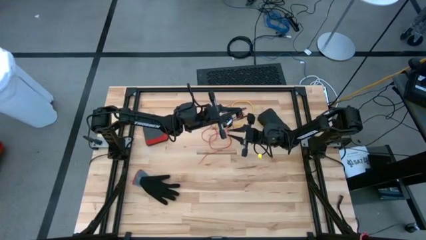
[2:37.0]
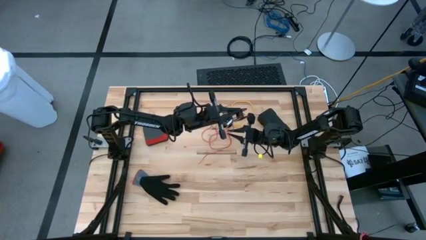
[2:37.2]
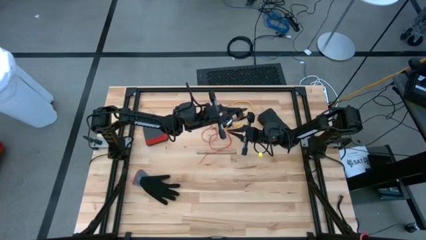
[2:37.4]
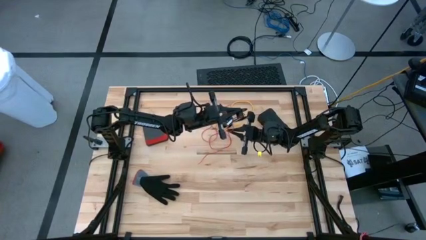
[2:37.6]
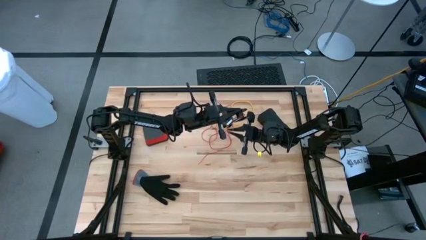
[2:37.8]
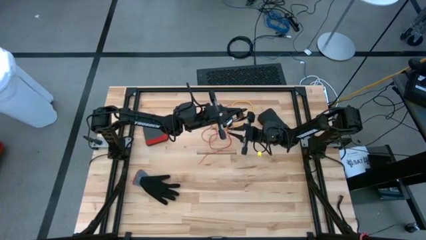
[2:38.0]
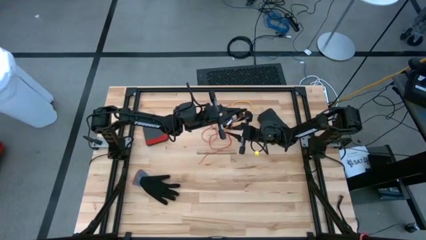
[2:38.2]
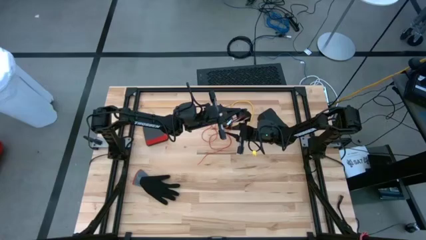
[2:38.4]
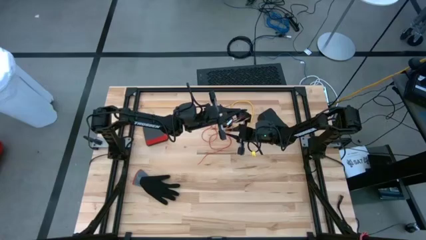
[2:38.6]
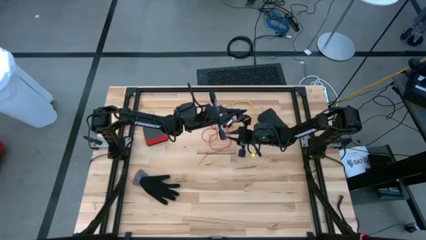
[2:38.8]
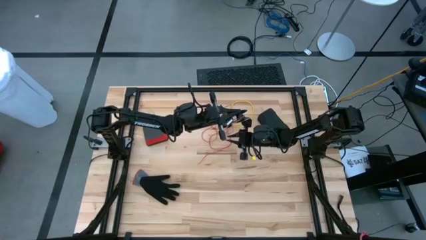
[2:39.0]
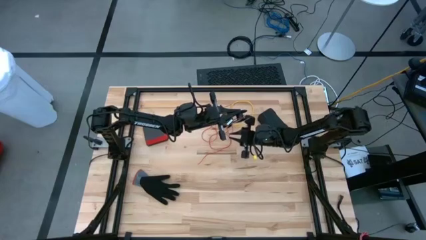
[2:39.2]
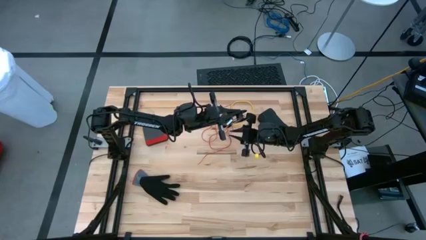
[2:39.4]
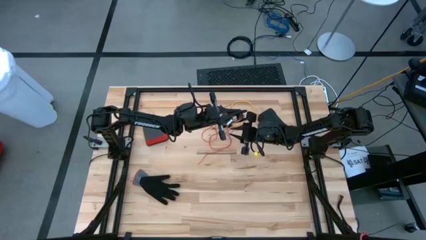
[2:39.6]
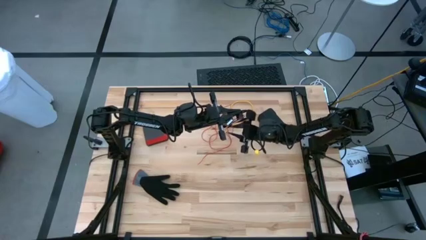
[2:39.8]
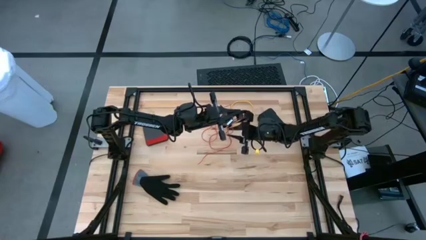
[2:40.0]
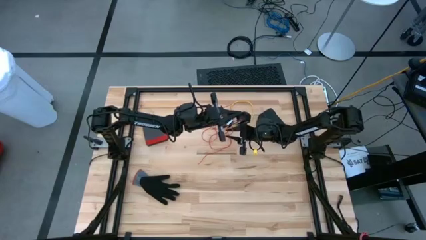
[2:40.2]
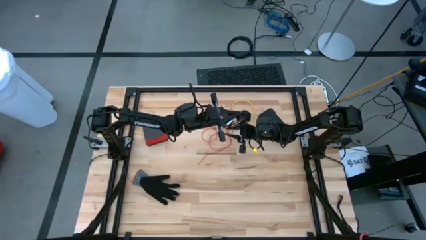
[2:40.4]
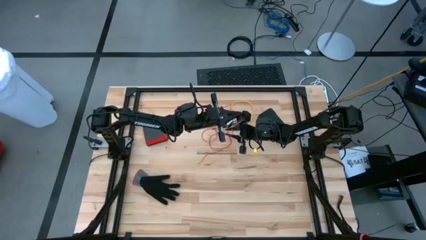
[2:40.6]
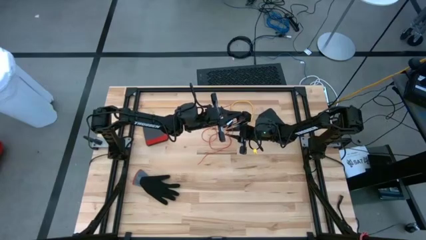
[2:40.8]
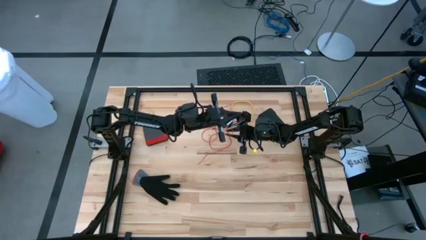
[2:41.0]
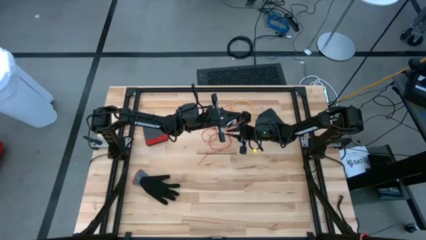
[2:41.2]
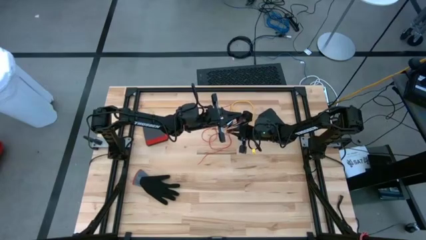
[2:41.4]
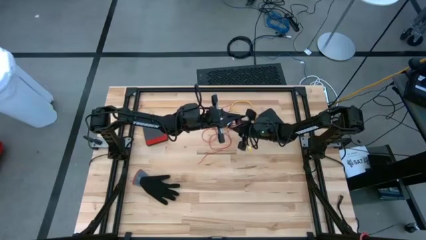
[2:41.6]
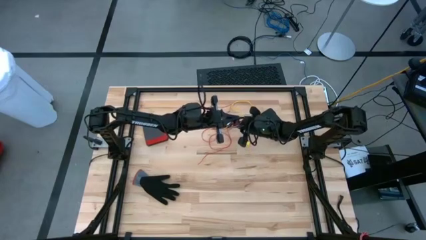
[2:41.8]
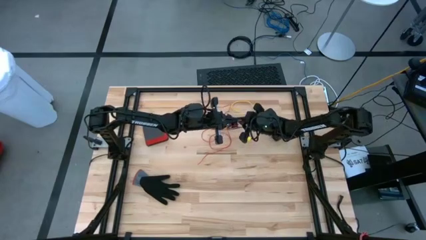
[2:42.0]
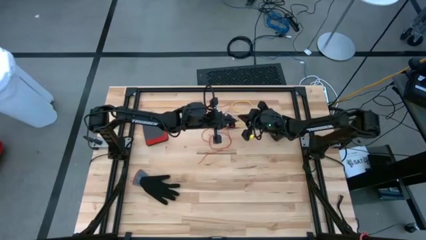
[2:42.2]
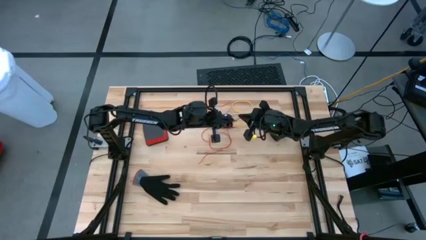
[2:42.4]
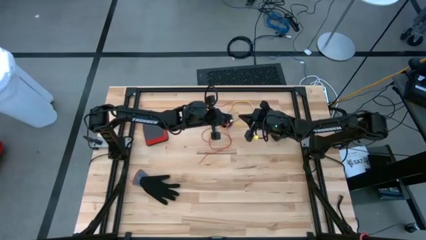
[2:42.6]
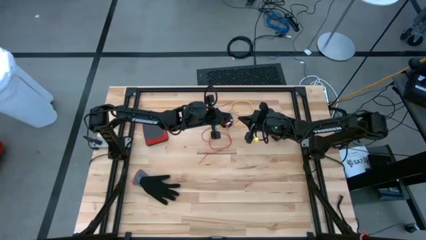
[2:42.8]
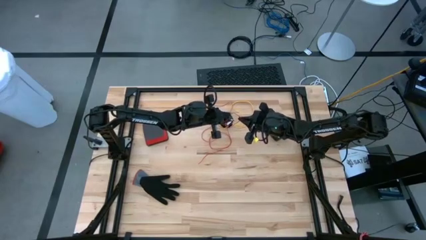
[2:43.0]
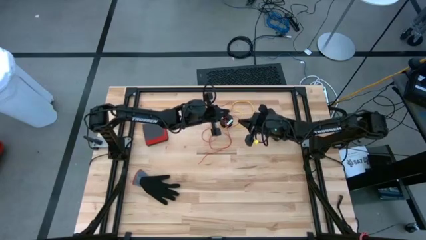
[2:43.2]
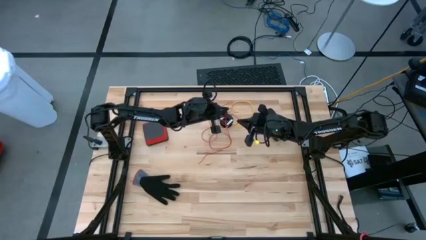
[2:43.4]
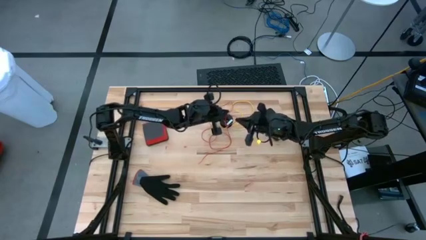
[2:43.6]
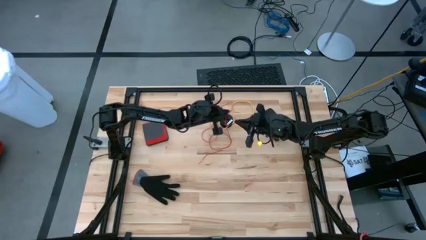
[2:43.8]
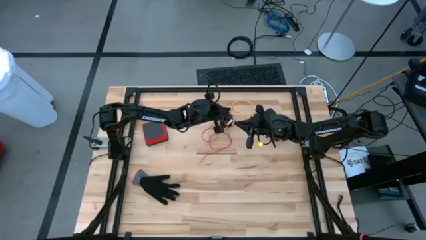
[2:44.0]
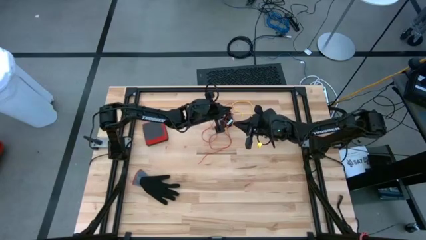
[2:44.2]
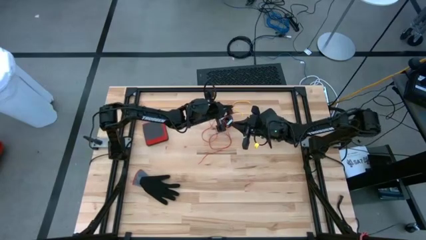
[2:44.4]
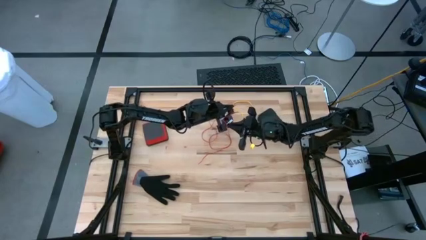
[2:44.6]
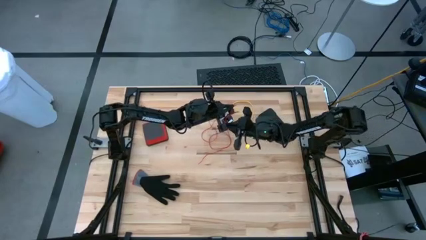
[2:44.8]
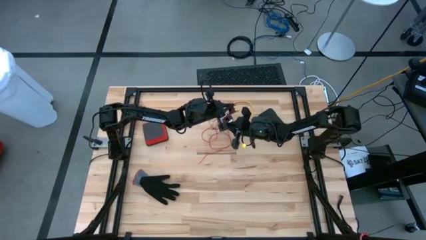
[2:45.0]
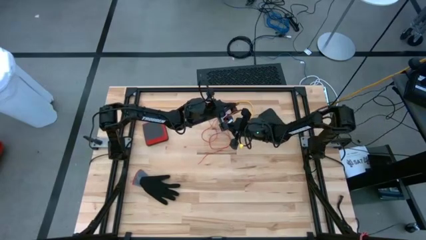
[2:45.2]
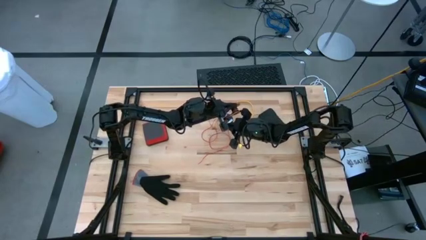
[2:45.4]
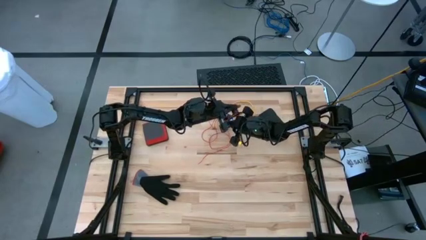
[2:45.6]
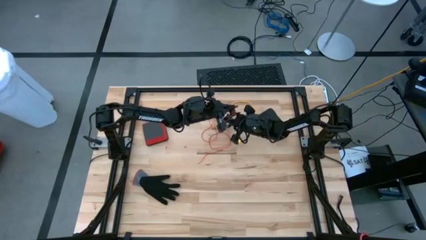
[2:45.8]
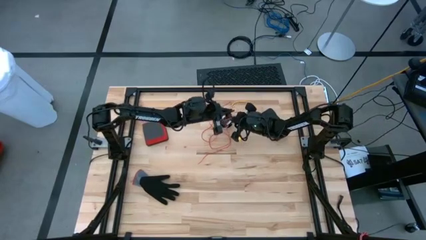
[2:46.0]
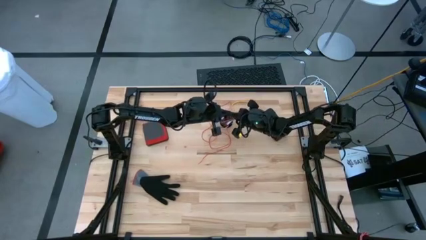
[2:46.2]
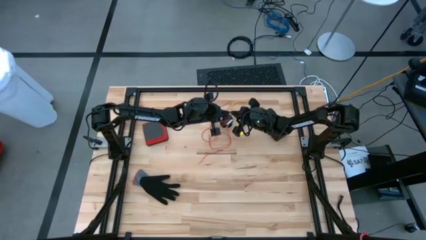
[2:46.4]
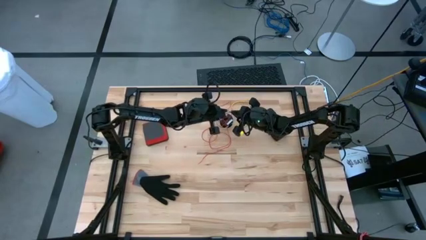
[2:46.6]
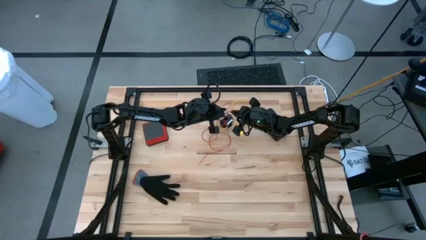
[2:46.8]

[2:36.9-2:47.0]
Task: Coil cords
Coil the red wire into the spool

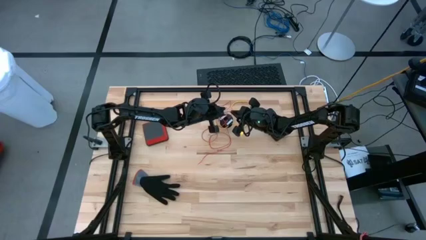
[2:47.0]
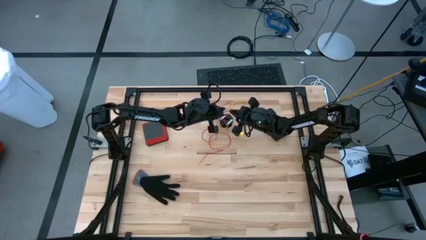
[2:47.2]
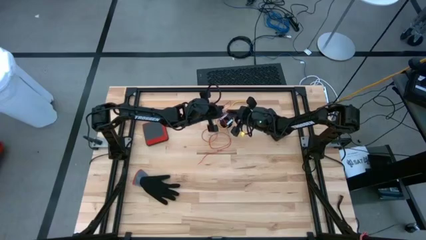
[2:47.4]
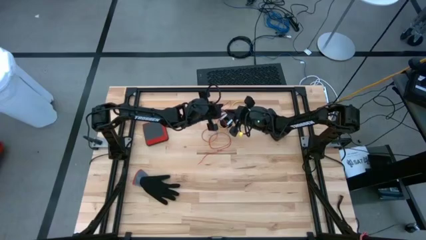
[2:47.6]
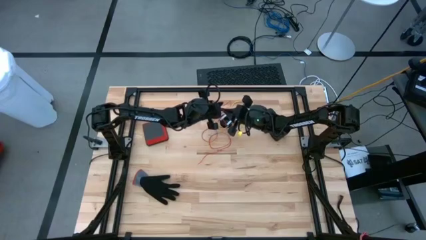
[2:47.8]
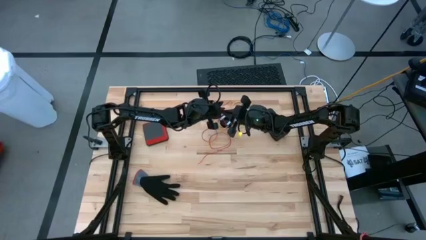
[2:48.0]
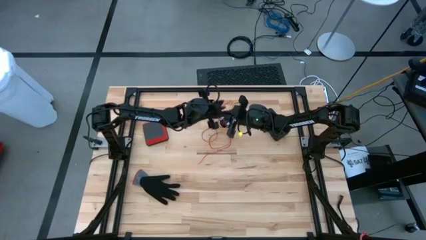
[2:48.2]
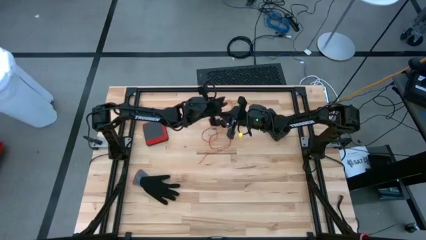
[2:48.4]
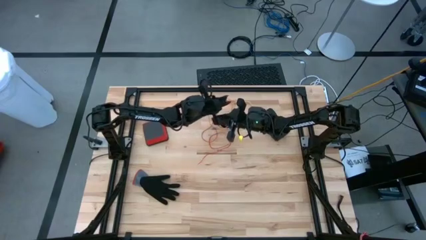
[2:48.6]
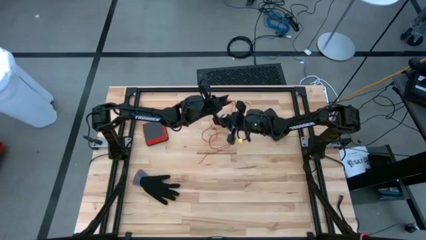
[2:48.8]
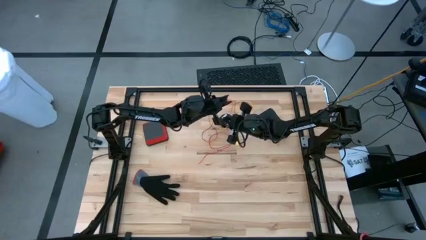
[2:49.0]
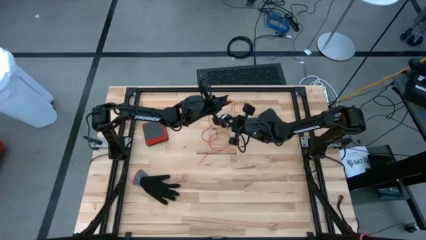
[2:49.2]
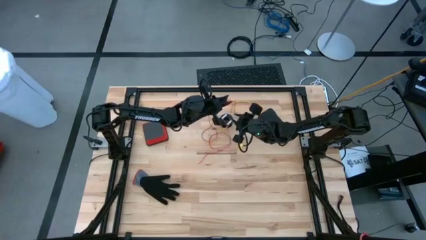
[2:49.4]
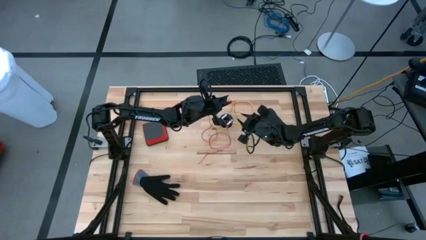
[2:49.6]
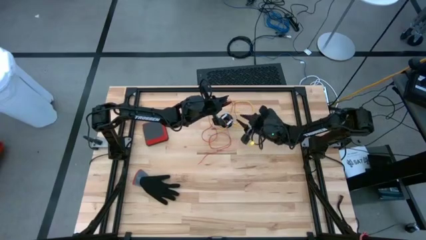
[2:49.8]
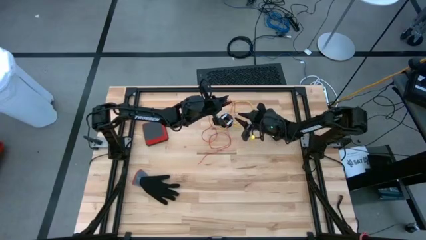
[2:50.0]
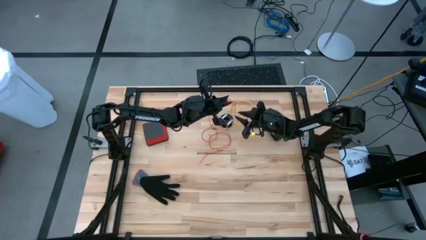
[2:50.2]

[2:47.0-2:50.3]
Coil the red wire into the spool

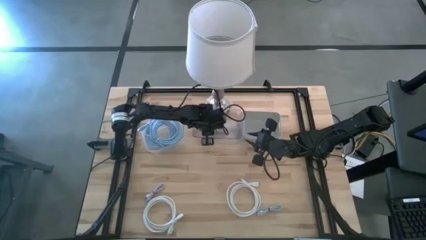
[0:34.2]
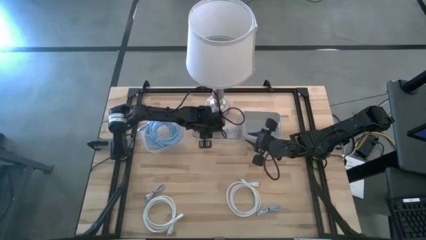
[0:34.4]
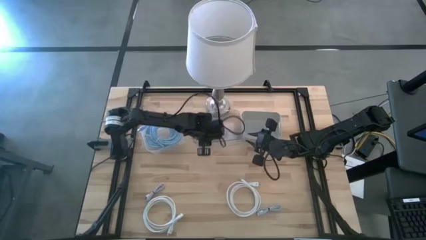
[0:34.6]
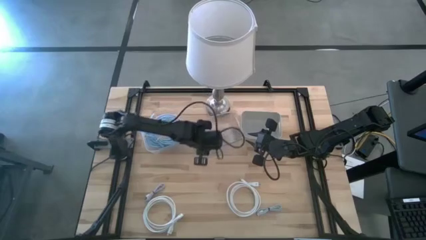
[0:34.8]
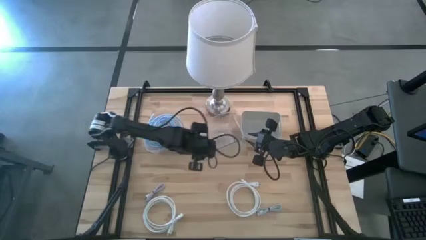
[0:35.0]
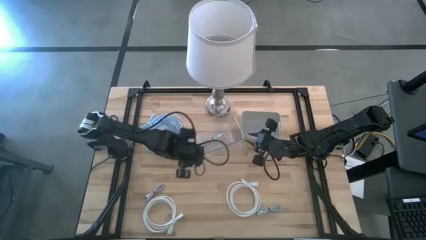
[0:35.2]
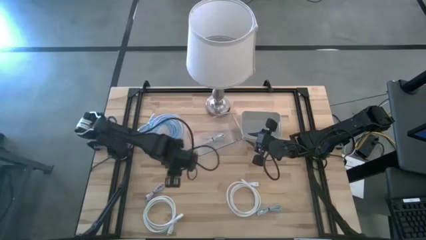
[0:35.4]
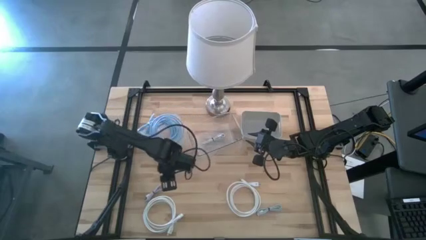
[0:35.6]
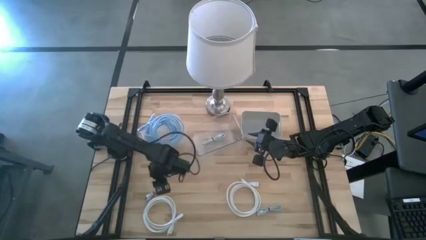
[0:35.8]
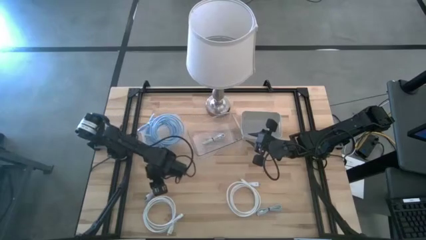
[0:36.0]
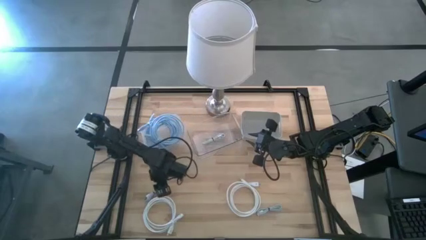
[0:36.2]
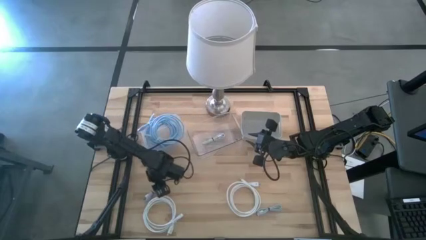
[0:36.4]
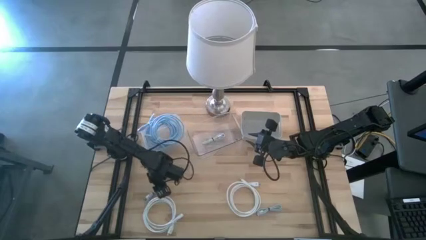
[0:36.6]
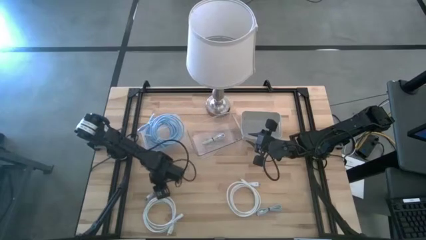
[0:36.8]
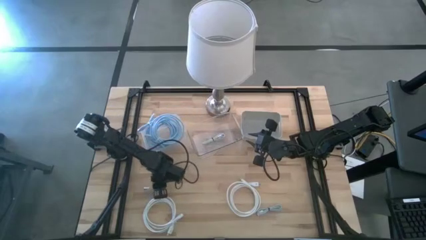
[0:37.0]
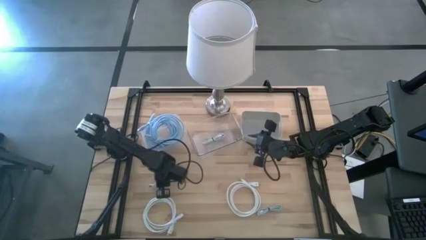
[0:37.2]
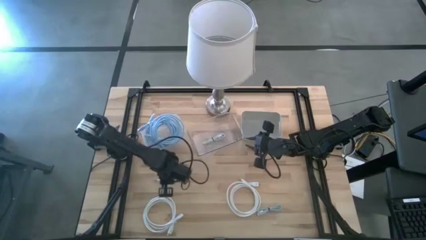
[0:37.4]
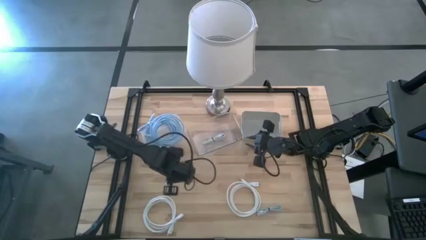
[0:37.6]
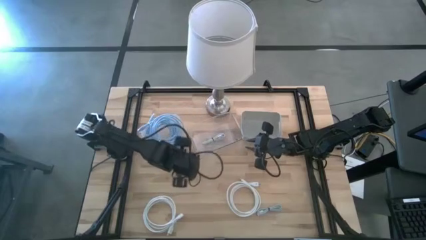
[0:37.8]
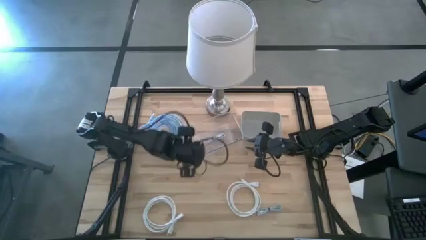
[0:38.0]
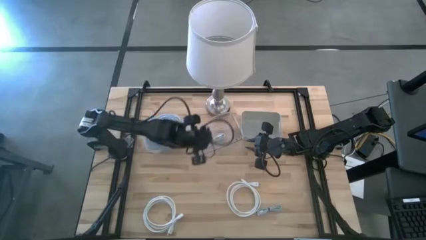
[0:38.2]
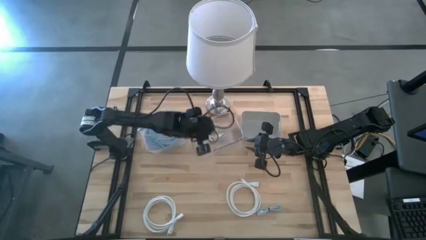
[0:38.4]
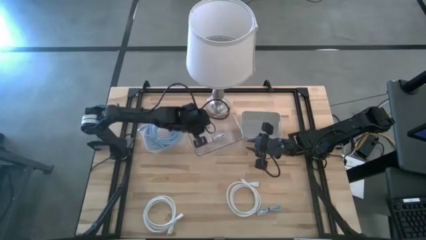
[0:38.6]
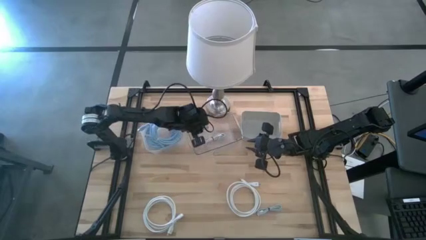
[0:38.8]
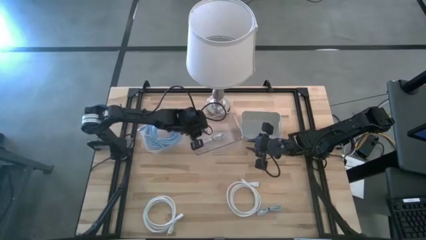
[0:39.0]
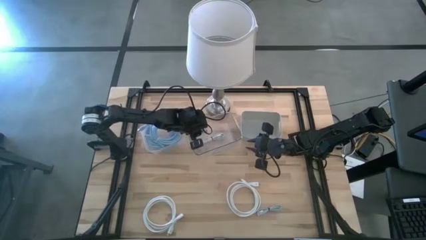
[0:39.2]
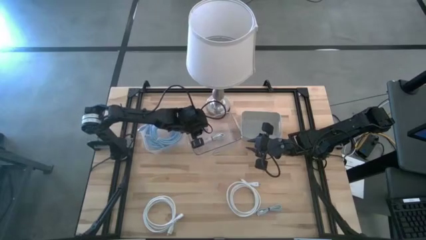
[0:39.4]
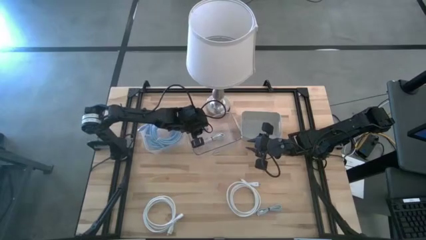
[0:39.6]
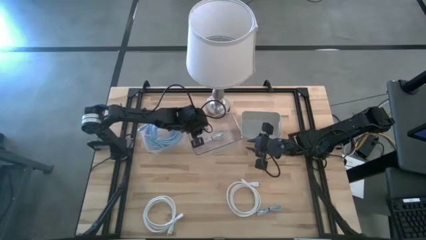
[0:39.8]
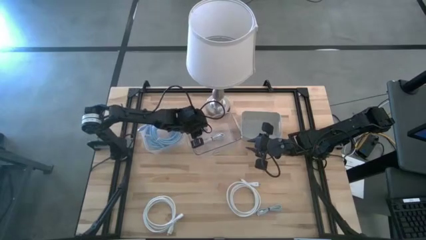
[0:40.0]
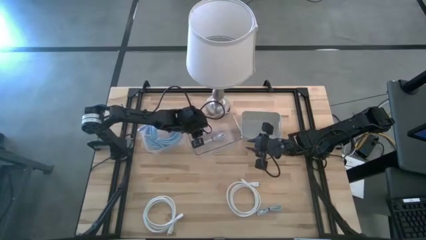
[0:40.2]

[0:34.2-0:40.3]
Task: Pick & Place USB Port
Put the purple usb cable into the transparent bin
